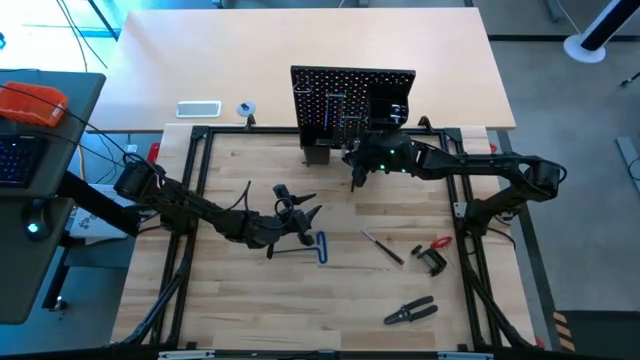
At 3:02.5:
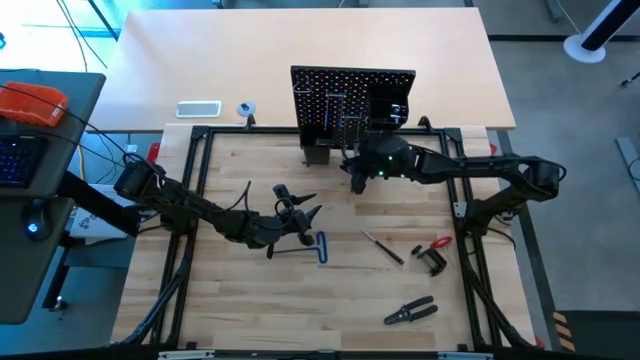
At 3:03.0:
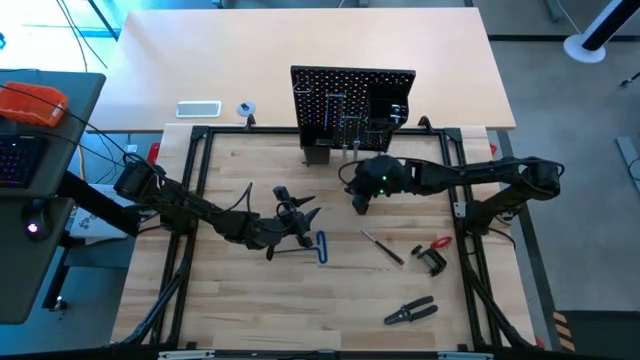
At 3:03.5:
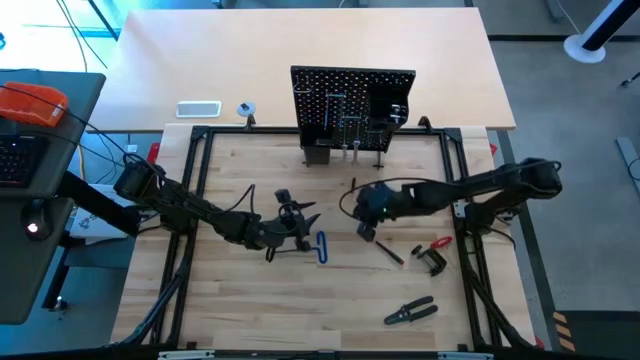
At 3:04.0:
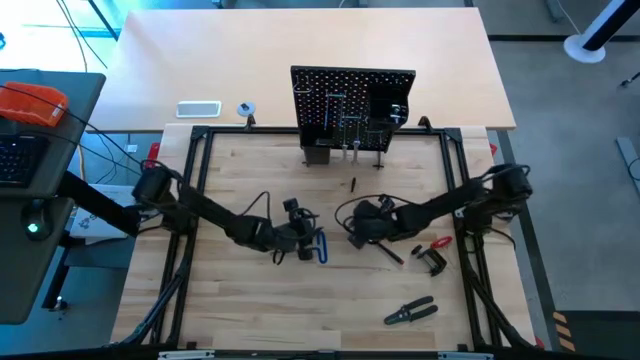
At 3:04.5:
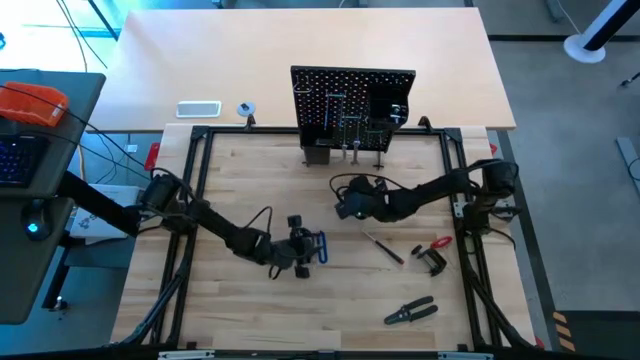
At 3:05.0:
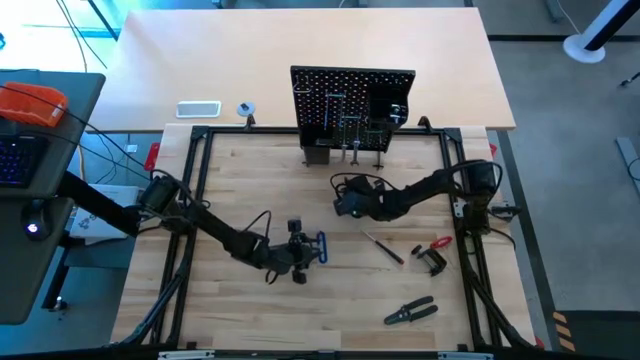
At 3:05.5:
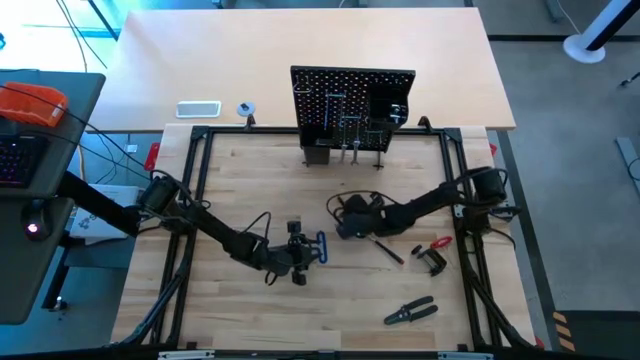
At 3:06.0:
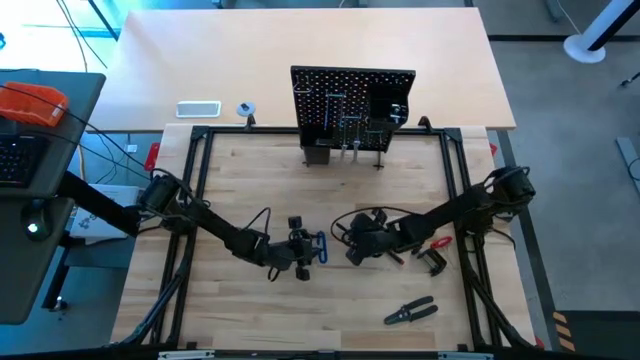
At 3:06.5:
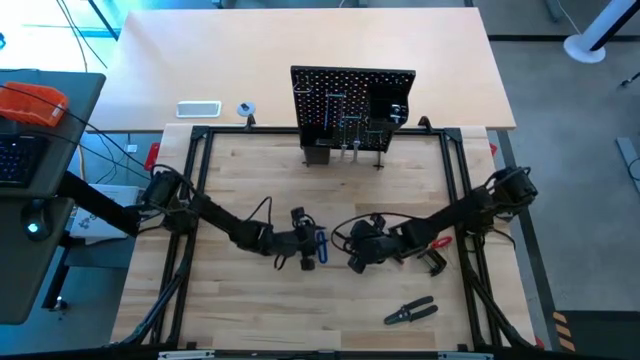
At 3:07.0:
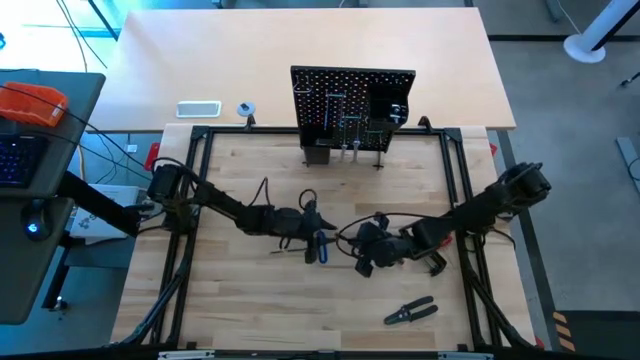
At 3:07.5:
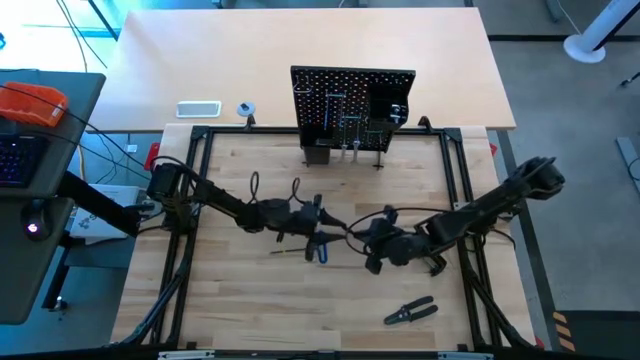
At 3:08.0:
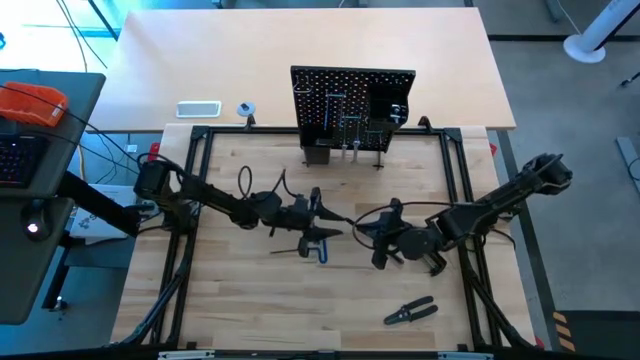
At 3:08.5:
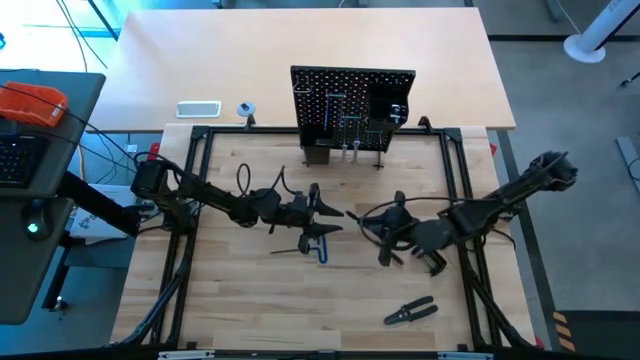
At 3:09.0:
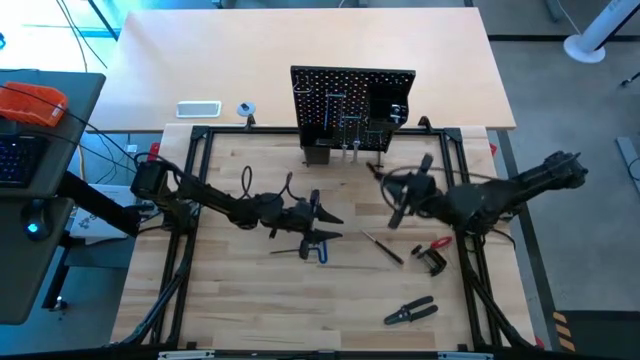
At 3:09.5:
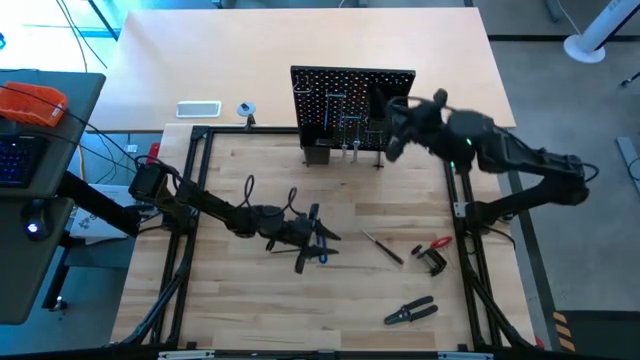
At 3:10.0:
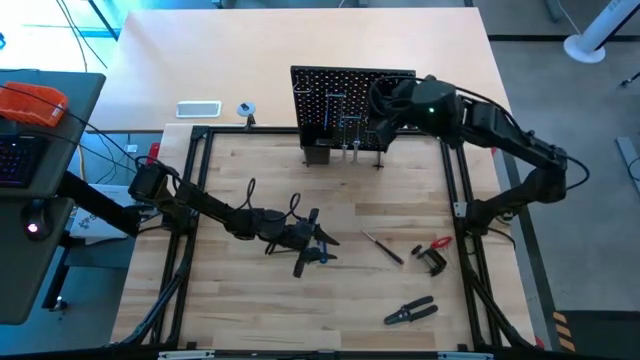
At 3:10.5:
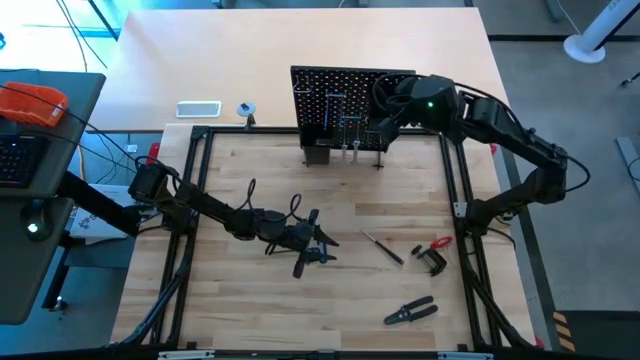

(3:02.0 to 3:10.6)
Task: Hang tools onto peg board
Put the screwdriver on the pegboard

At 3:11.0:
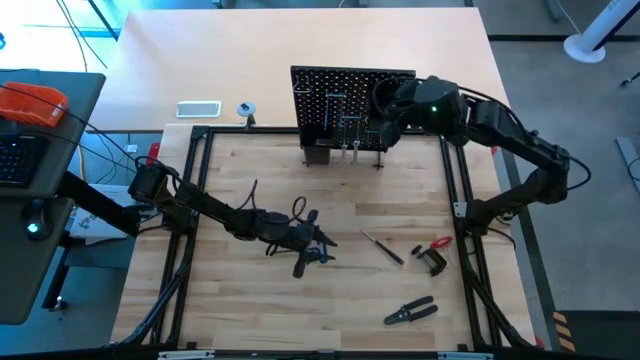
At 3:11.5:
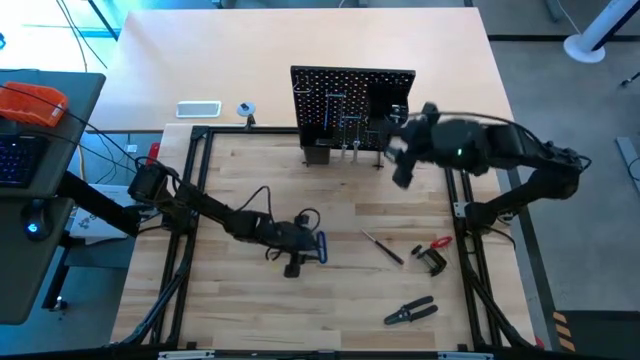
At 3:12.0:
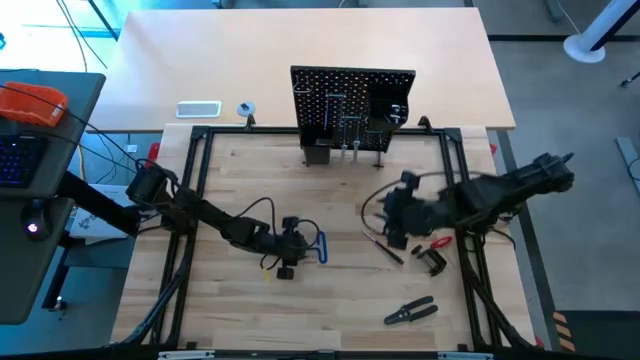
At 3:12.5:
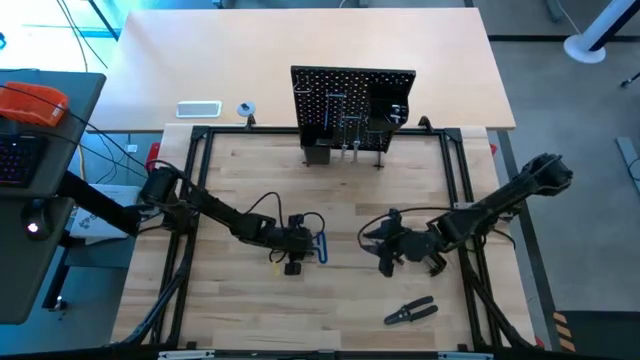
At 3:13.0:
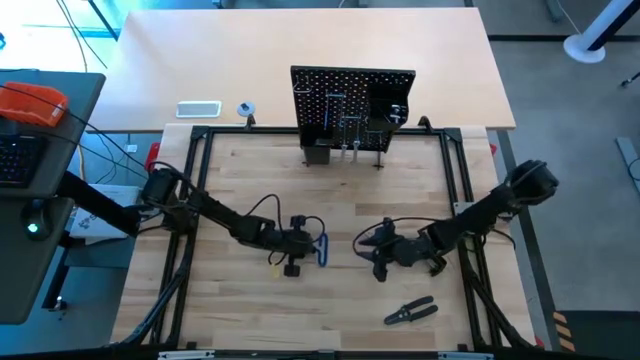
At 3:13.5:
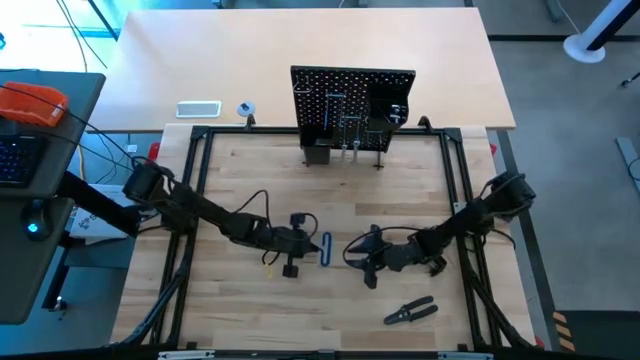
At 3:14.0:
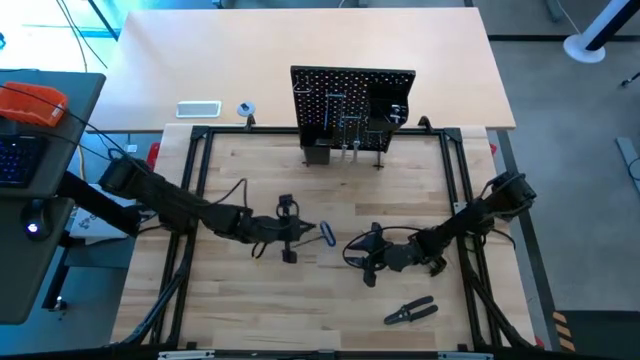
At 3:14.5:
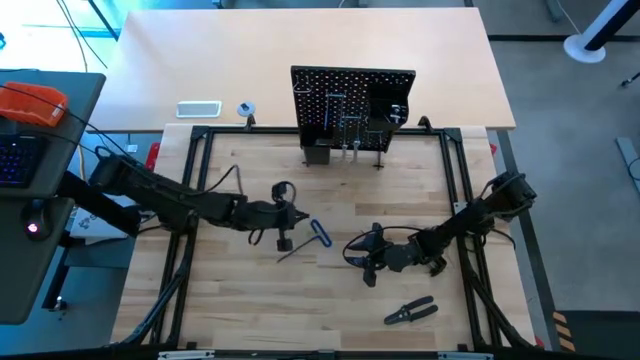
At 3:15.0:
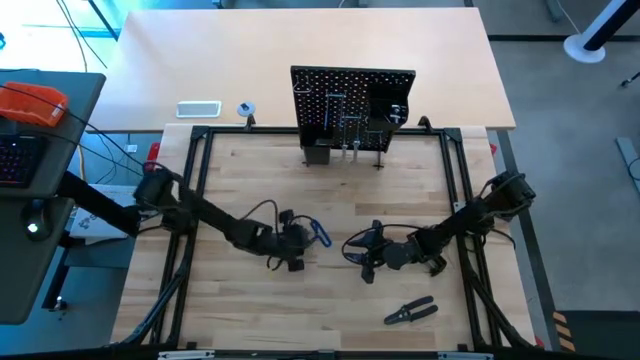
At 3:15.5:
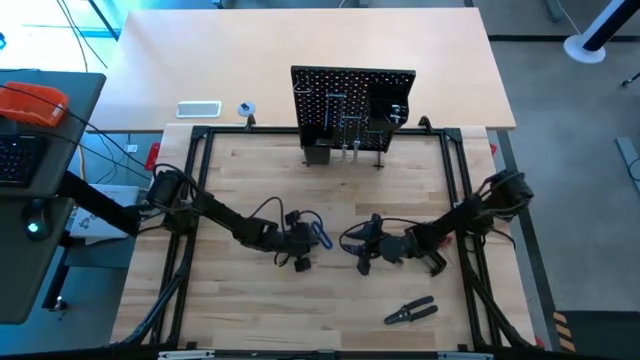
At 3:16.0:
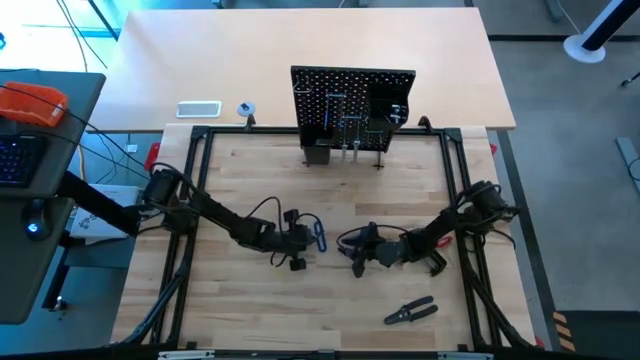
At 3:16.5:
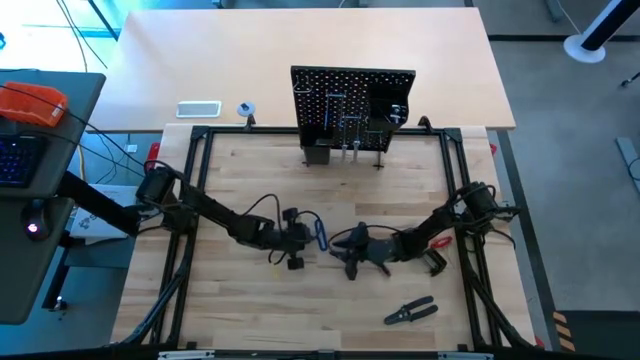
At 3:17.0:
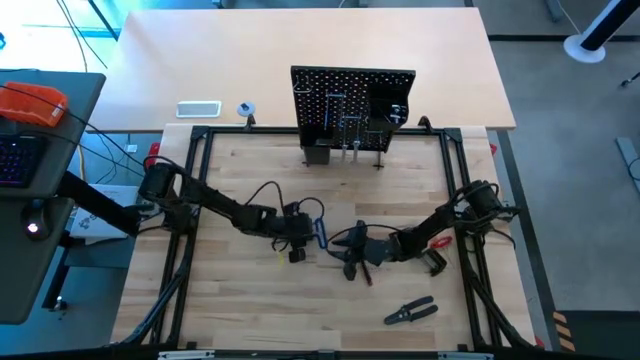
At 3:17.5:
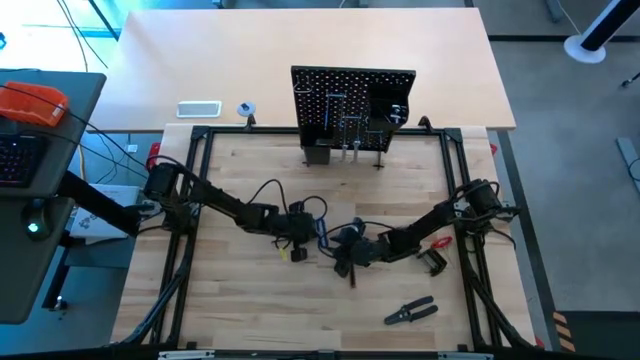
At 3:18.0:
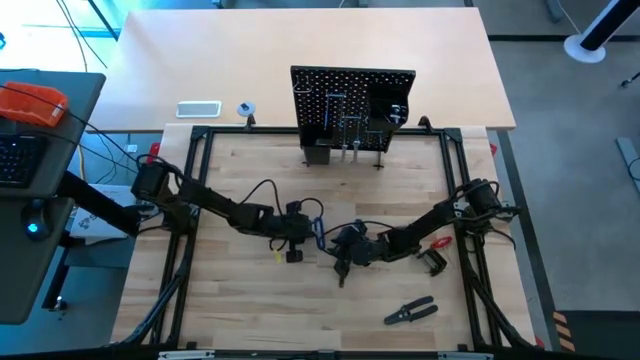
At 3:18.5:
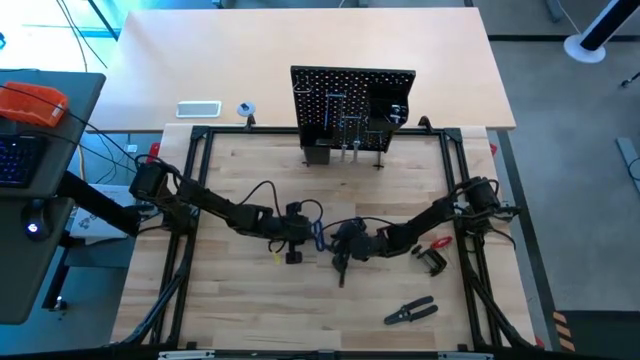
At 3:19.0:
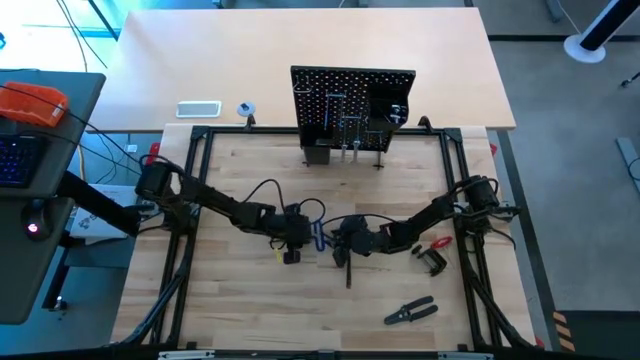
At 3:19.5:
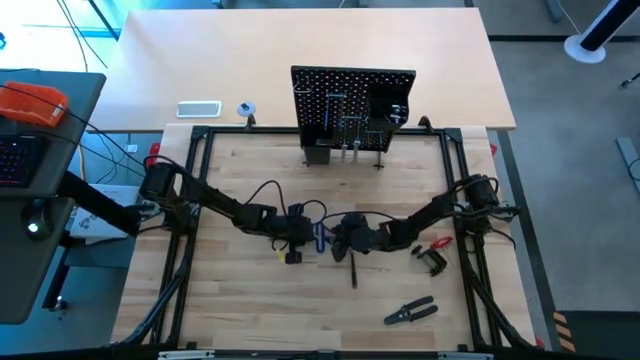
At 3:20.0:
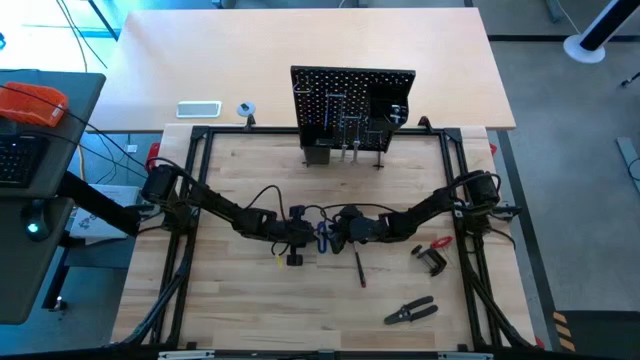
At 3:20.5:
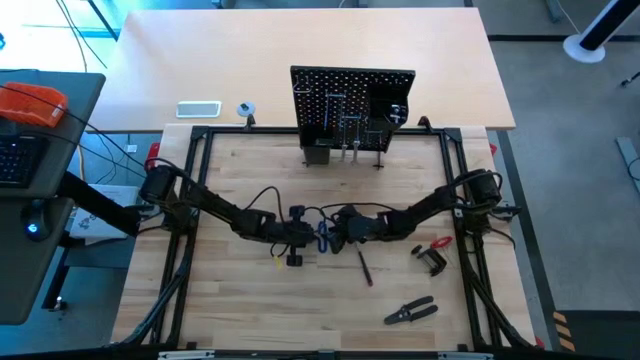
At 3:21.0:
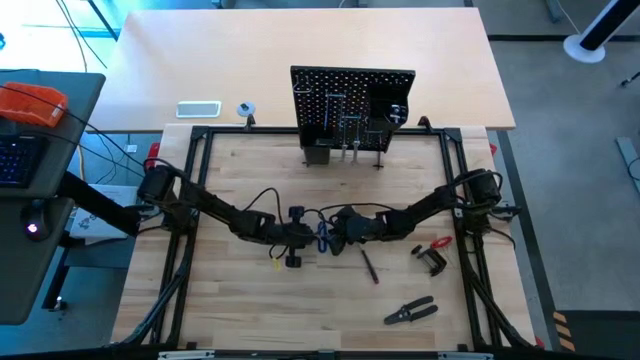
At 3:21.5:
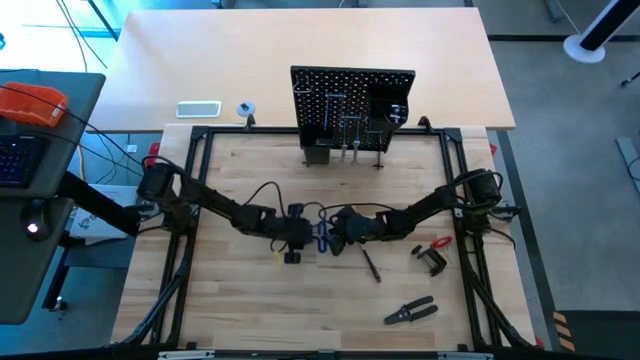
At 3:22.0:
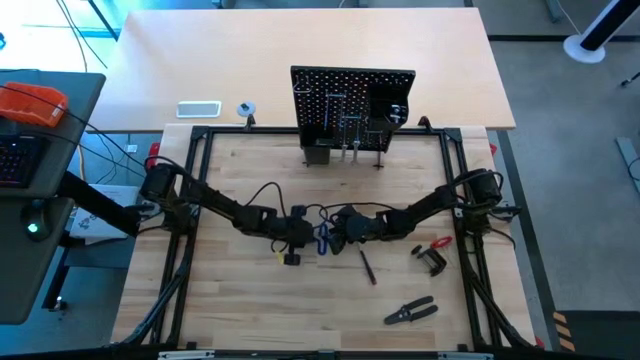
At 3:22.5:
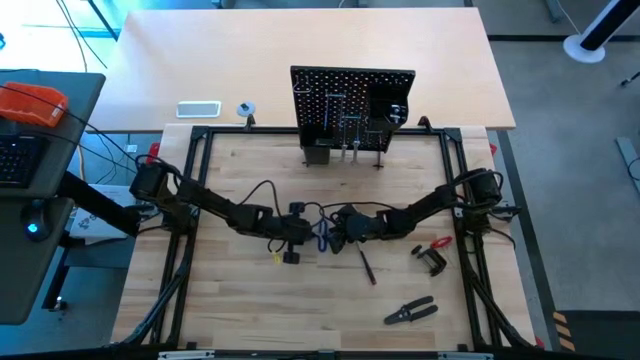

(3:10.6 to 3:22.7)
Hang the spring puller on the pegboard
